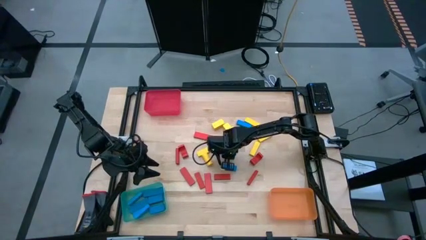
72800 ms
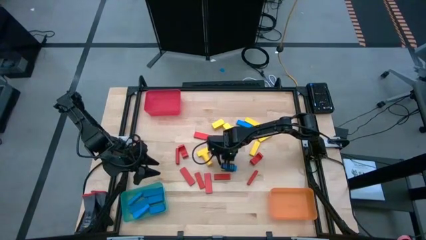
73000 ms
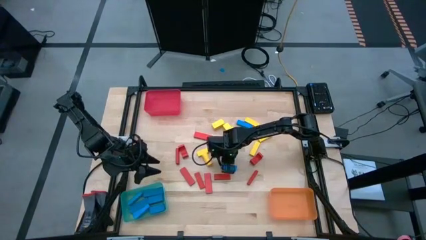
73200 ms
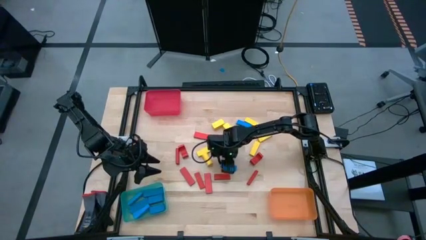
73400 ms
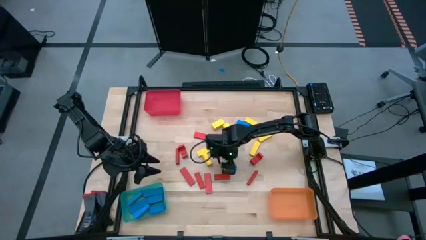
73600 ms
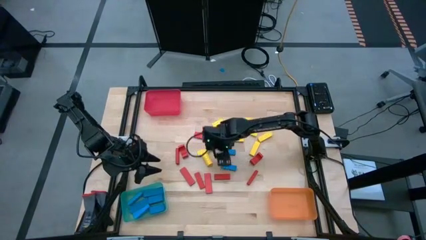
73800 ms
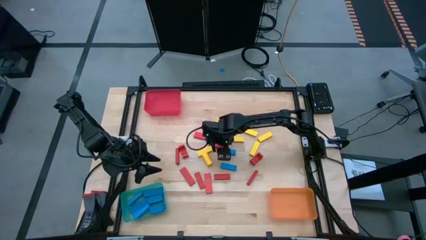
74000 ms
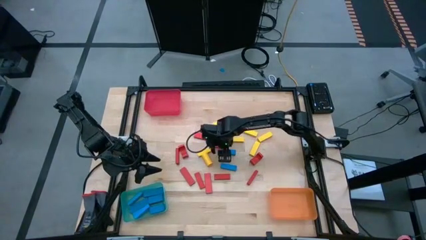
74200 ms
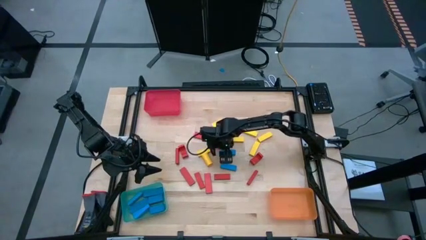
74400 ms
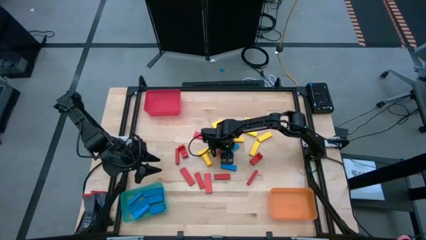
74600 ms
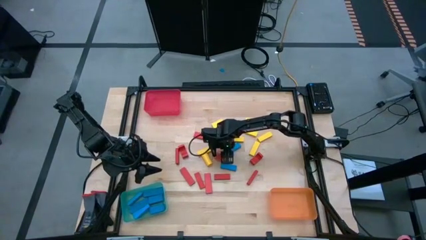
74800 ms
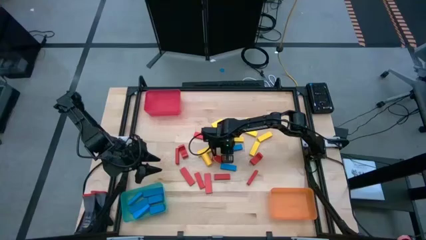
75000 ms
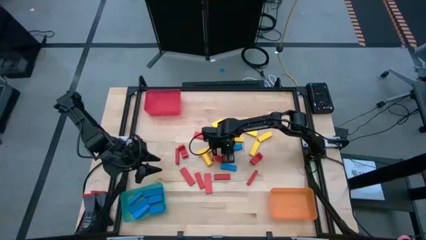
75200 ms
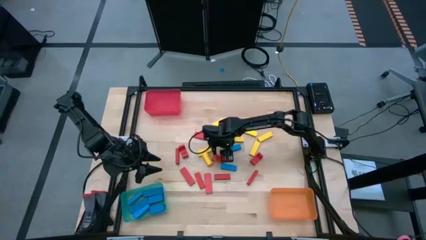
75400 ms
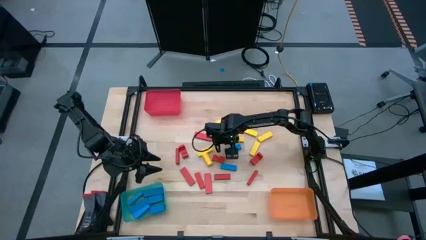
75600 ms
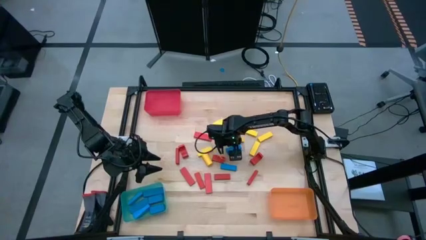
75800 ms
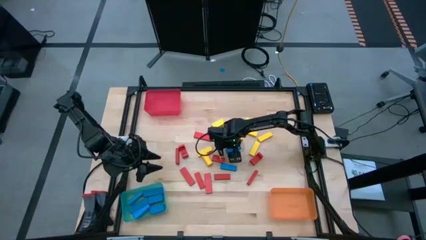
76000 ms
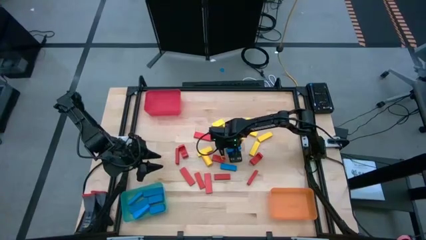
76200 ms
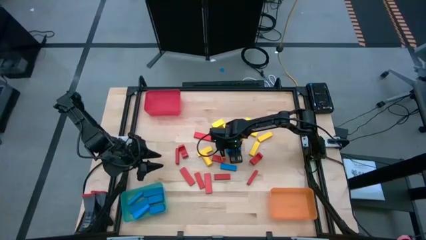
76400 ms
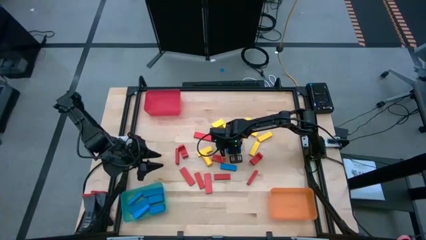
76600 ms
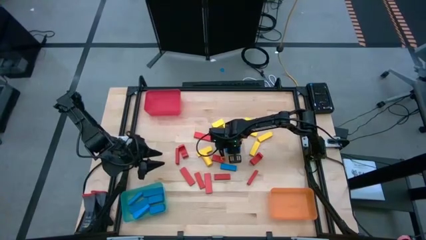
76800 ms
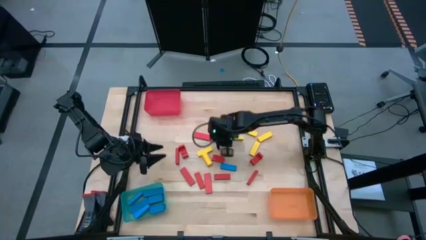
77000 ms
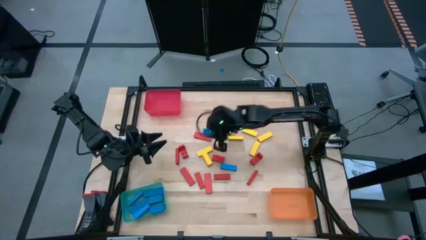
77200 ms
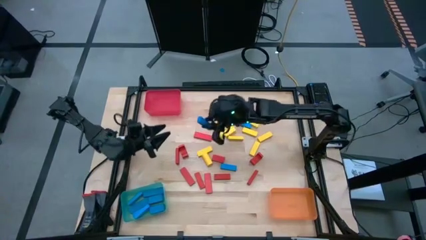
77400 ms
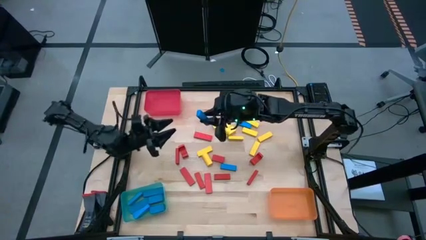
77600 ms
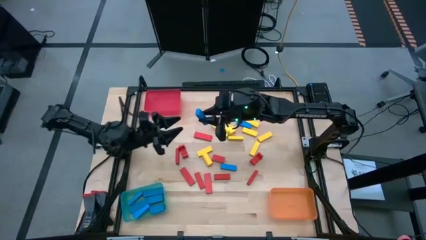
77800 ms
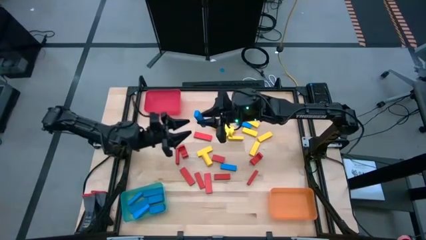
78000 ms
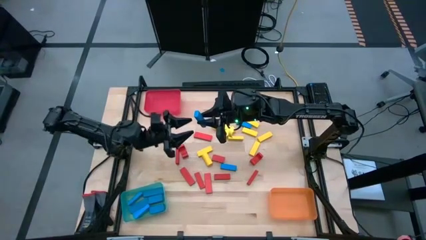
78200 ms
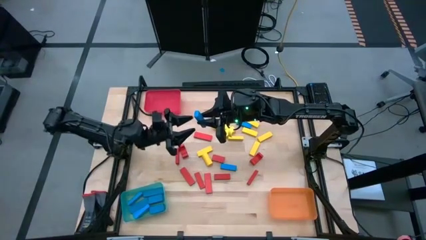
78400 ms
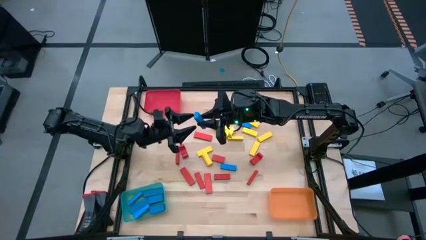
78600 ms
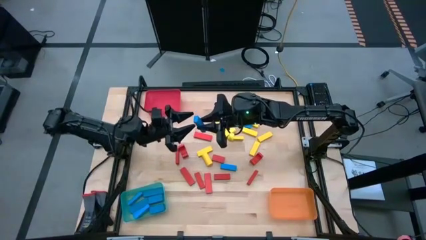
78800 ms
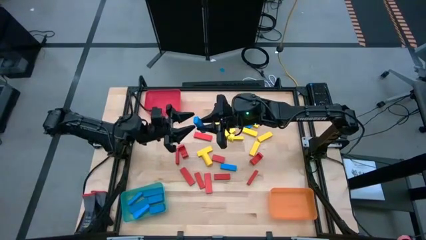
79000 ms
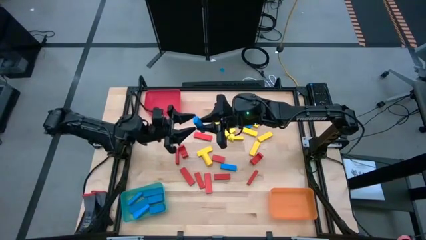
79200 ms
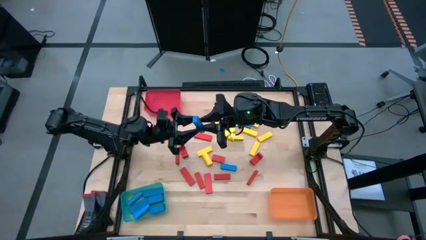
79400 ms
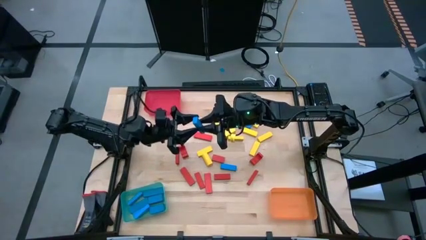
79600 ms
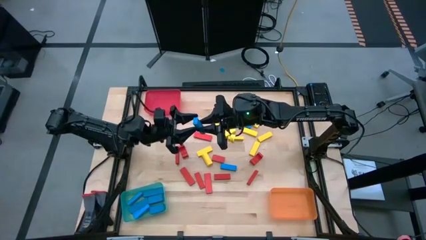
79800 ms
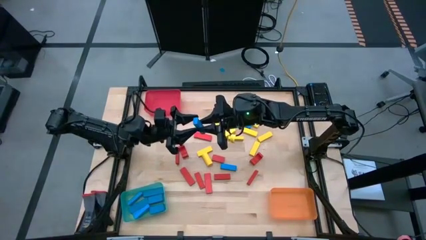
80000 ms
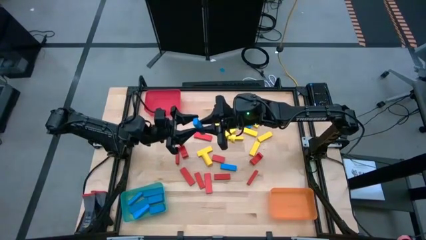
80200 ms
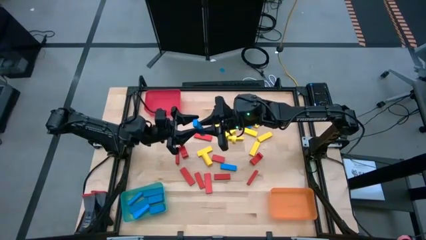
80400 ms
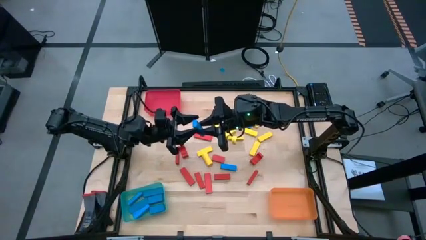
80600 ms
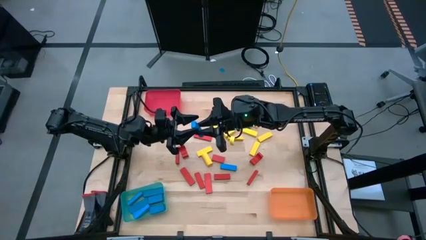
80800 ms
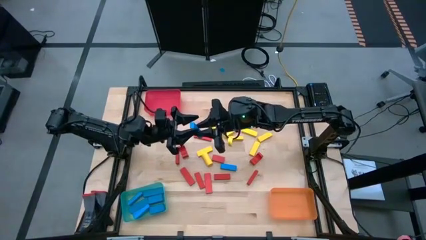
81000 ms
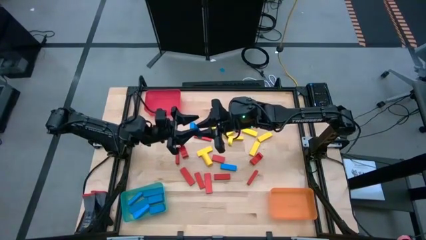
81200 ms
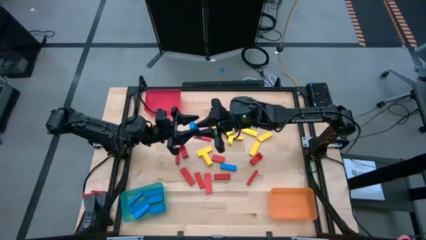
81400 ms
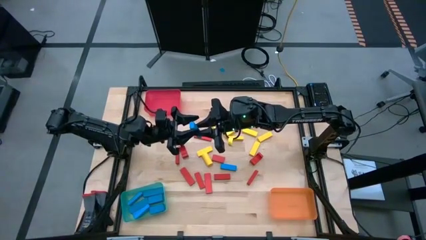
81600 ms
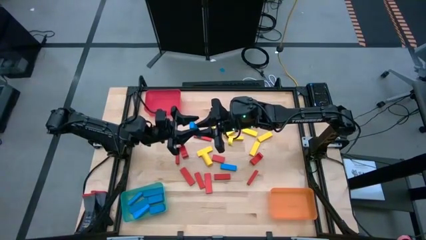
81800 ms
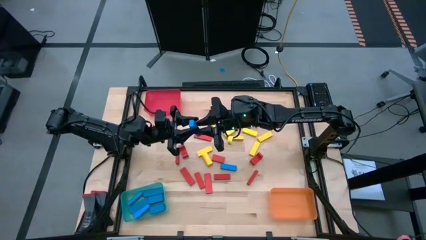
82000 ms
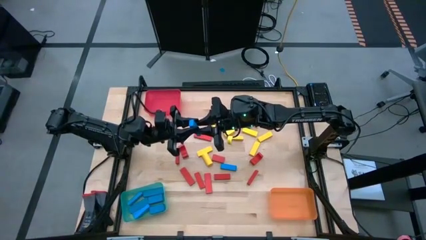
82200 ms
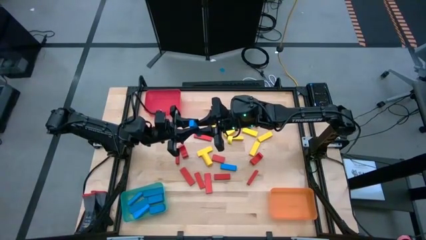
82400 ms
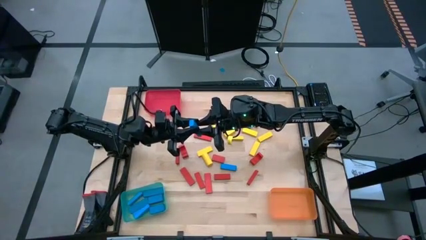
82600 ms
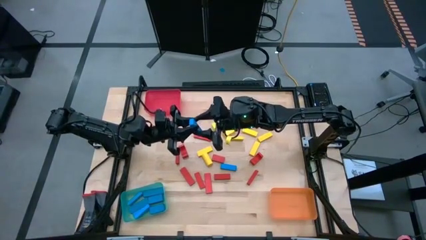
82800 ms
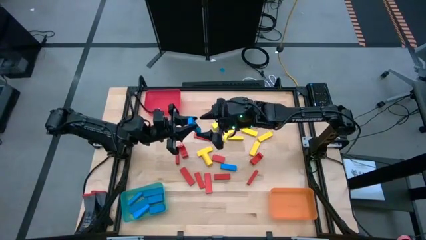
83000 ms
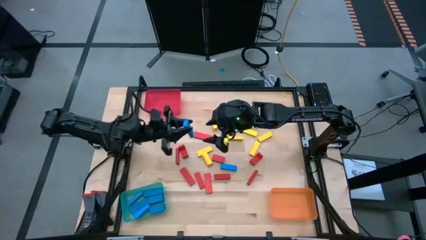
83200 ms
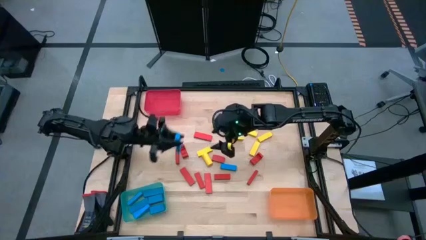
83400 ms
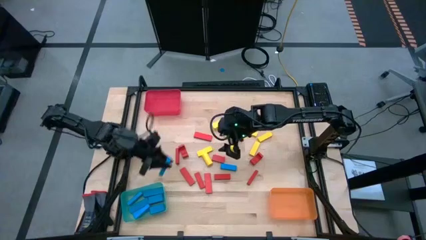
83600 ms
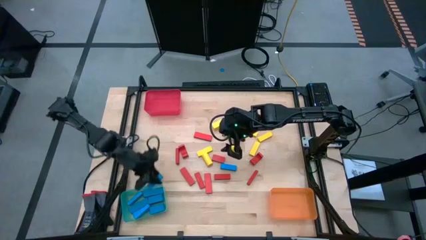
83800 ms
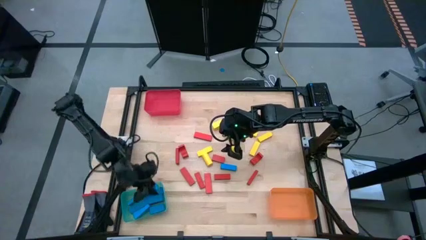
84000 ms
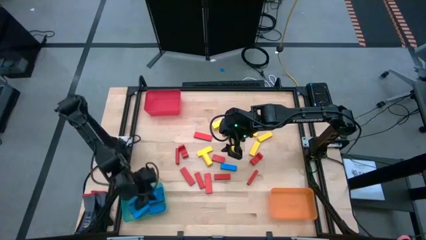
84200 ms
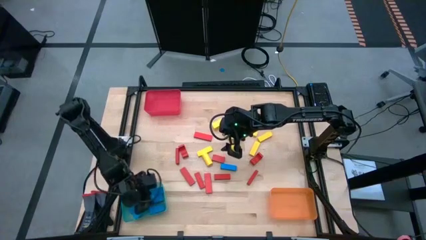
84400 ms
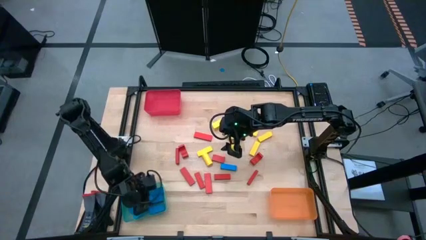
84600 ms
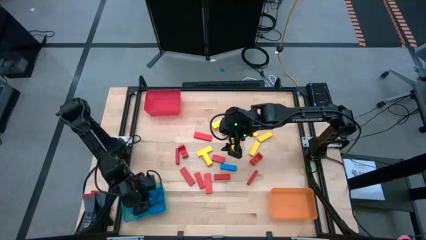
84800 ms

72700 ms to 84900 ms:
Task: Sort blocks
Put the blue block into the green bin

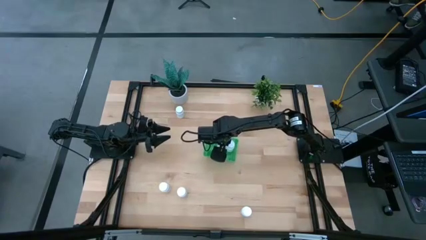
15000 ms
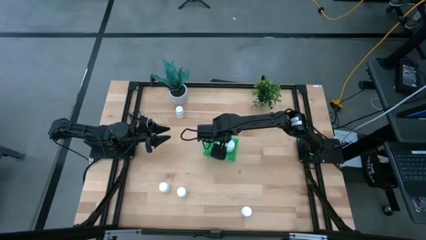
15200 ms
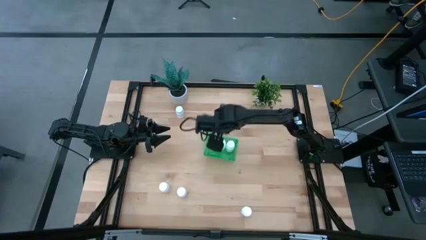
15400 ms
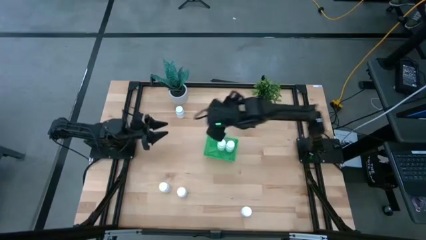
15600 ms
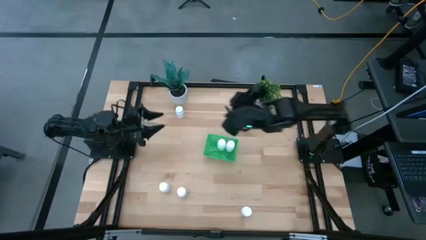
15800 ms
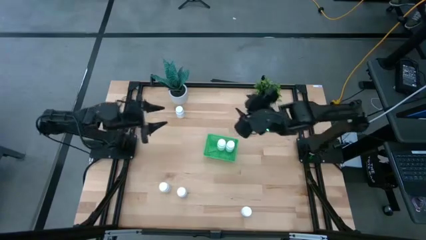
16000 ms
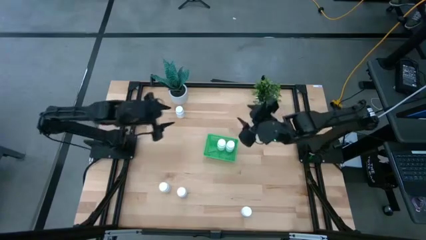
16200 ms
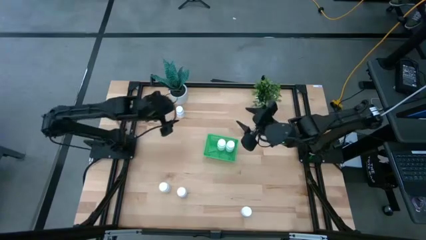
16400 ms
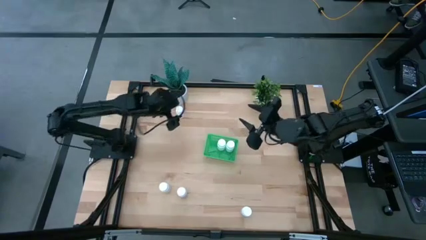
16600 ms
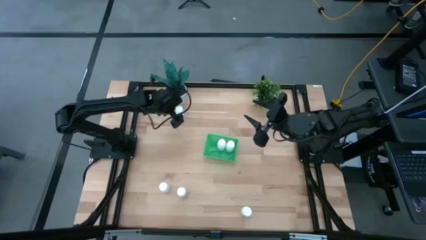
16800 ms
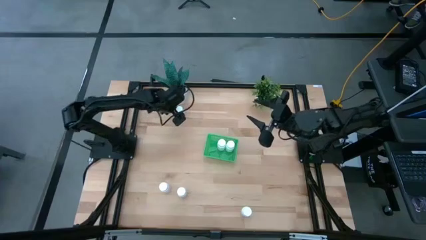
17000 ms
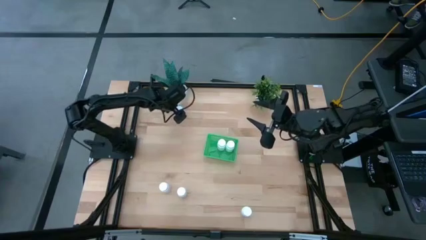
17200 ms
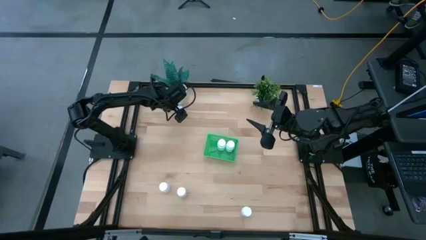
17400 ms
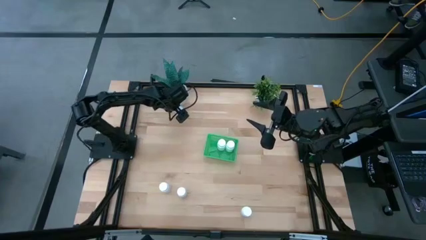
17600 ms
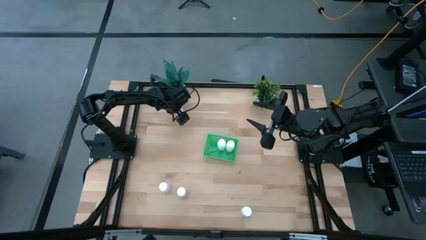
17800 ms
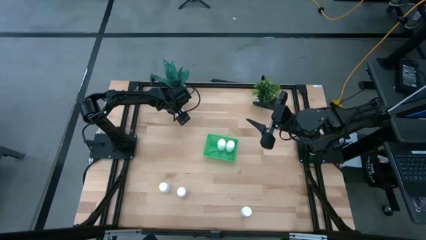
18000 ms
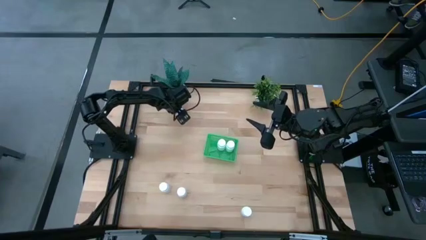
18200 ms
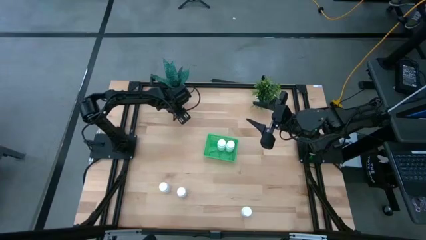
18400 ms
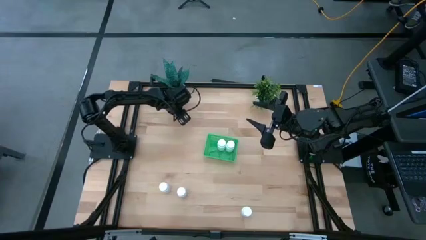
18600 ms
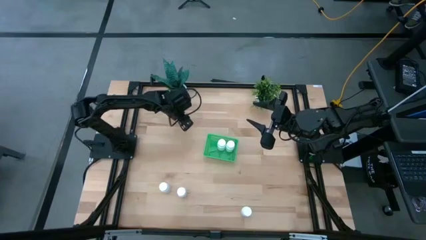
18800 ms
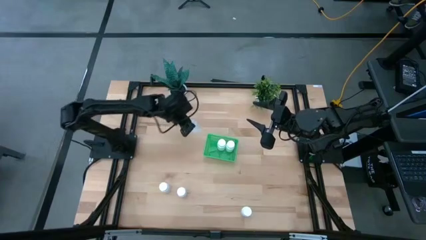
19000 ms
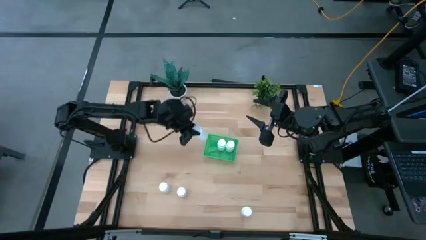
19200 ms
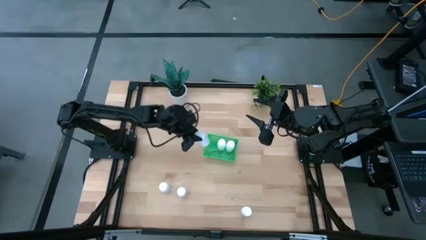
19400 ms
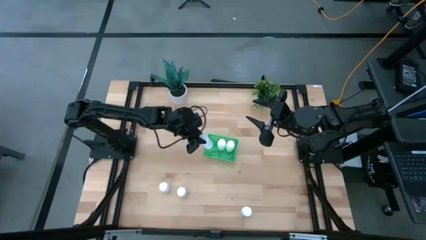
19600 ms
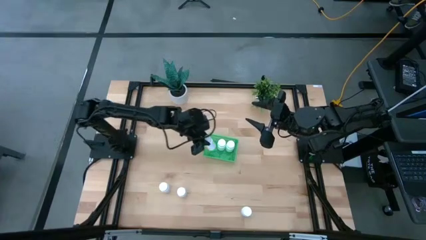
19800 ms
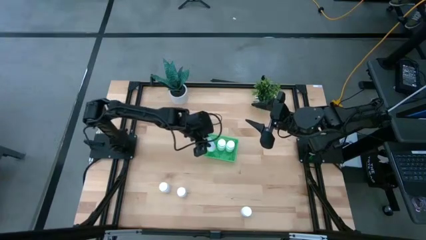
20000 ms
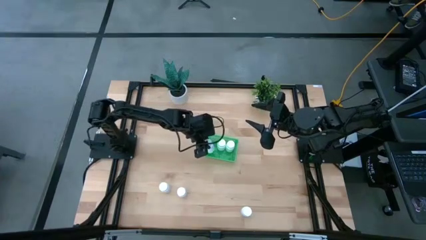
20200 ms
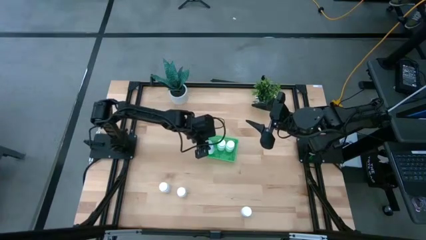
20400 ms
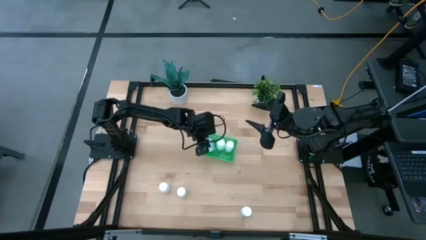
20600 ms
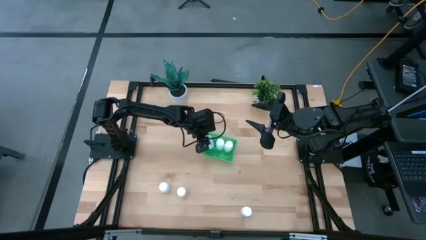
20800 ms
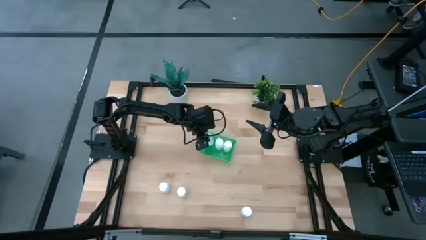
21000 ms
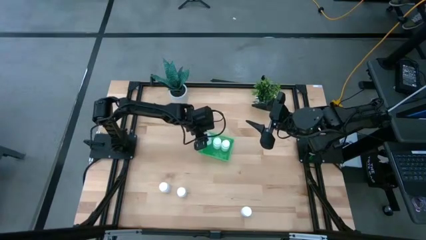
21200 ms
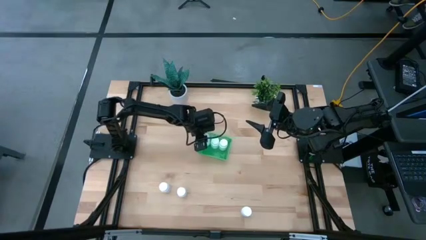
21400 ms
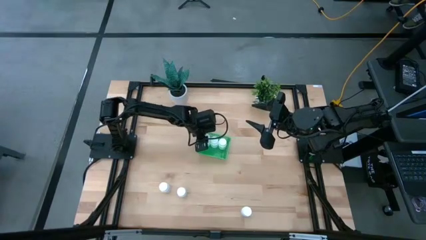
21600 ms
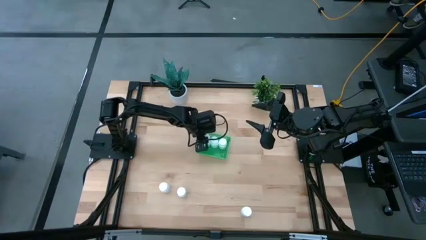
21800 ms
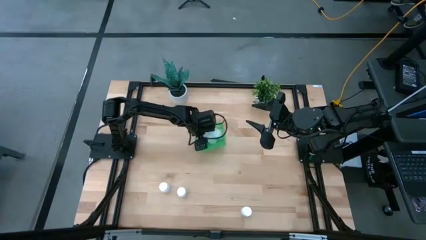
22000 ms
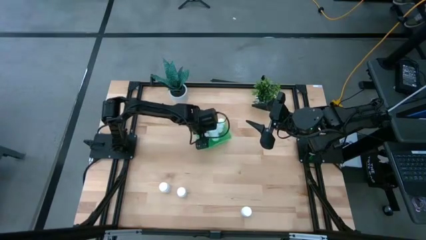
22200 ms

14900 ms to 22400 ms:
Task: Pick and place pill bottles into a basket
Put the white pill bottle into the green basket
